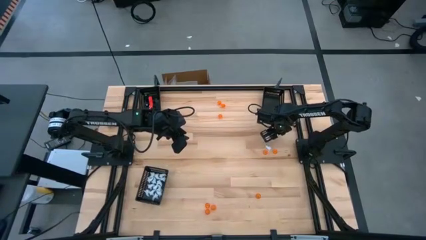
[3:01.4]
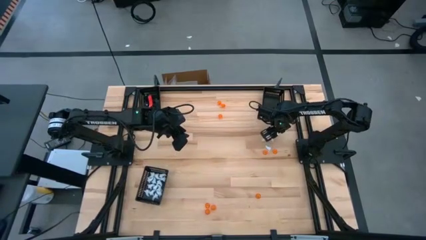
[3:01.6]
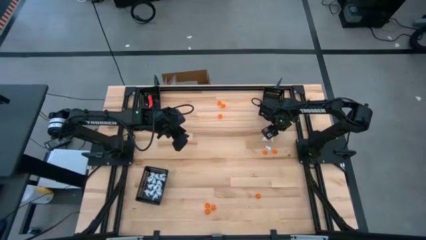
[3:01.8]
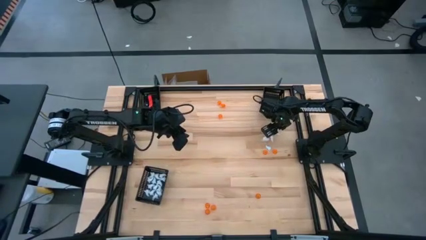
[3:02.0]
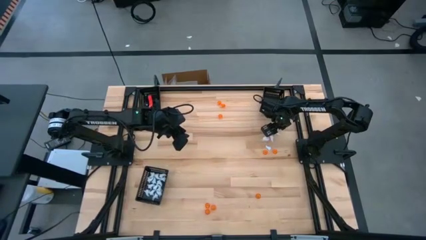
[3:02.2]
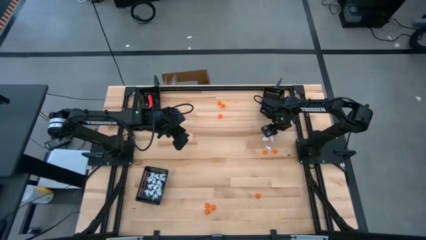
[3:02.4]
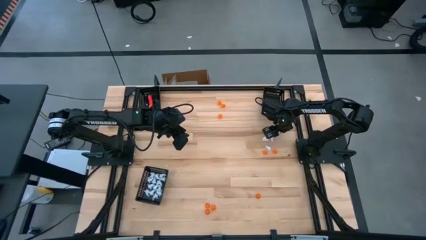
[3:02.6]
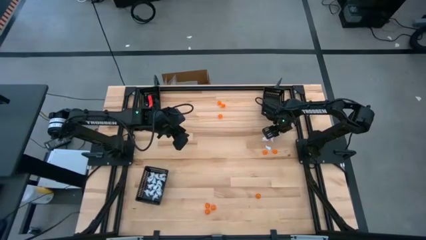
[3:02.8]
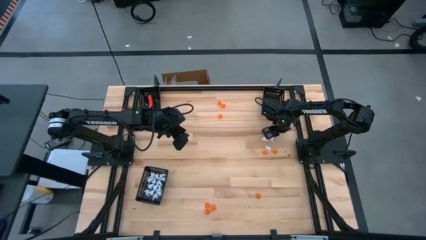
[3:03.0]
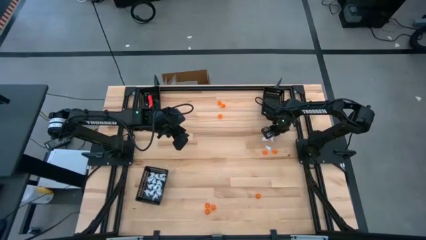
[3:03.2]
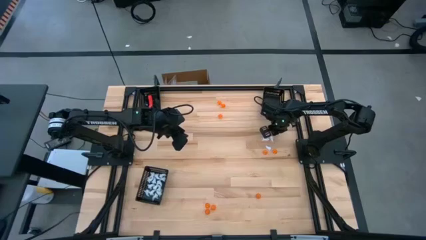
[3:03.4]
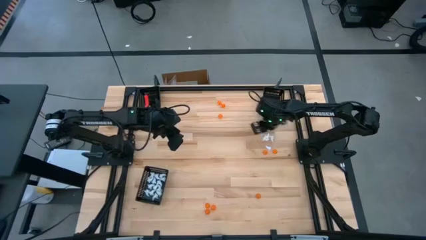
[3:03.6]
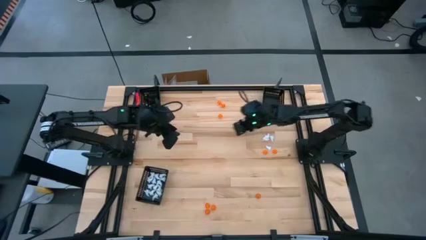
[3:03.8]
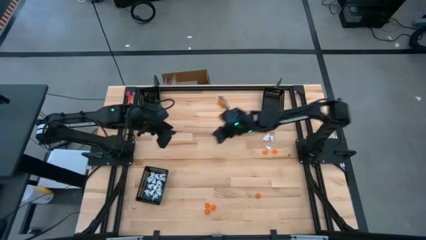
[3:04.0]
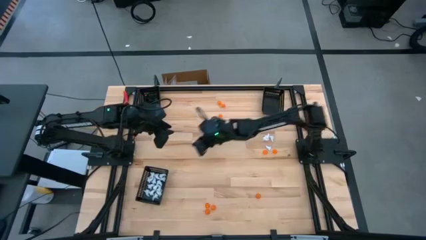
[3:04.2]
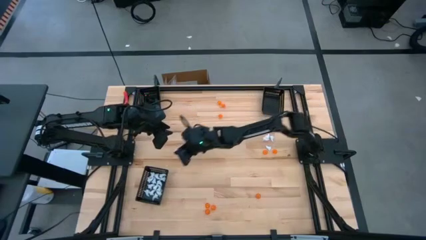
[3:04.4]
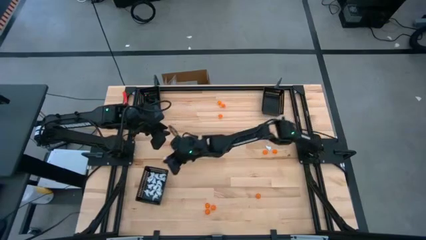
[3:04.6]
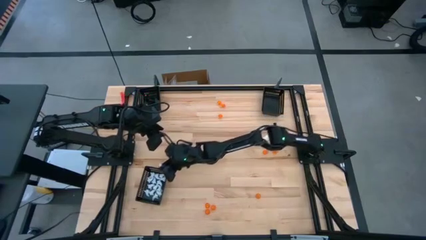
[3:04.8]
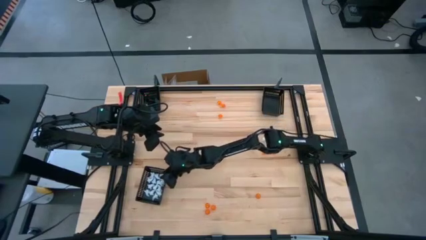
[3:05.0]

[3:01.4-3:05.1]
Task: Sort Halloween decoration
Put the white ghost toy into the bottom black basket

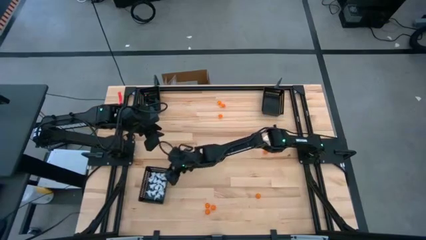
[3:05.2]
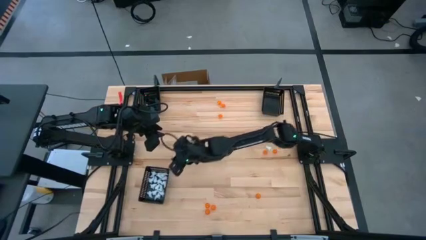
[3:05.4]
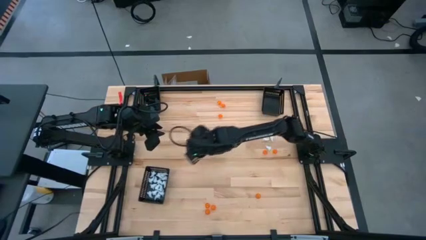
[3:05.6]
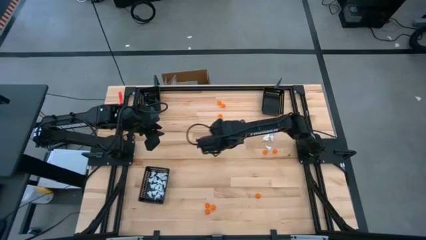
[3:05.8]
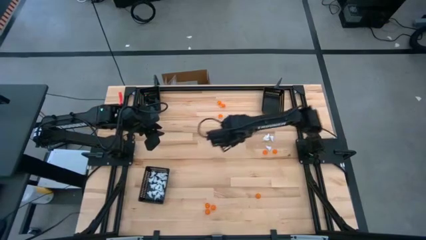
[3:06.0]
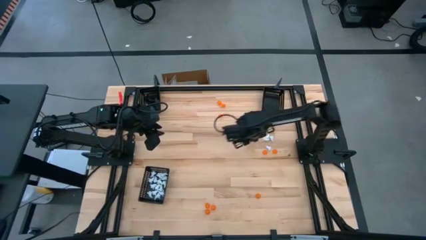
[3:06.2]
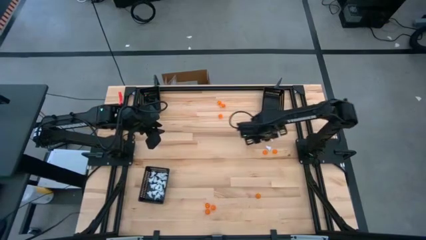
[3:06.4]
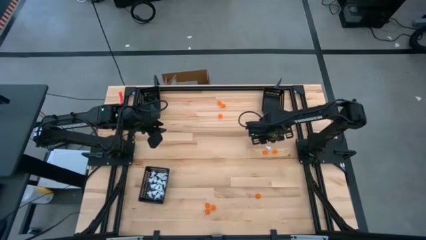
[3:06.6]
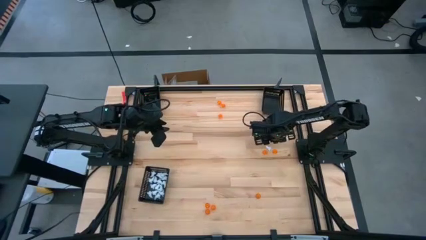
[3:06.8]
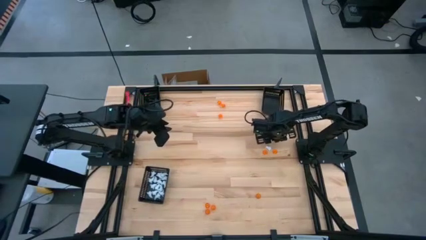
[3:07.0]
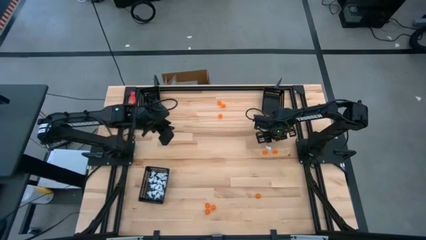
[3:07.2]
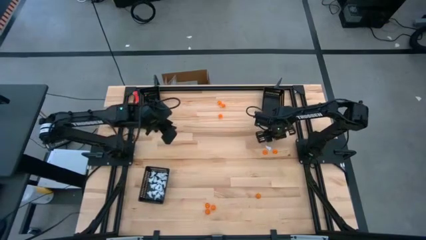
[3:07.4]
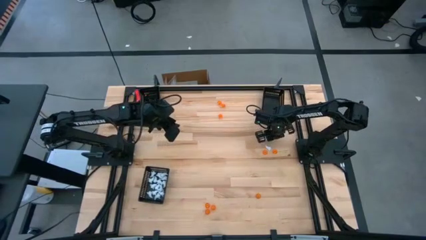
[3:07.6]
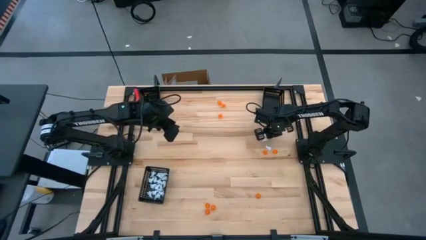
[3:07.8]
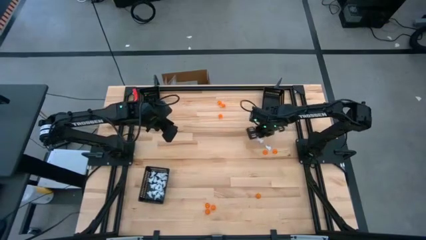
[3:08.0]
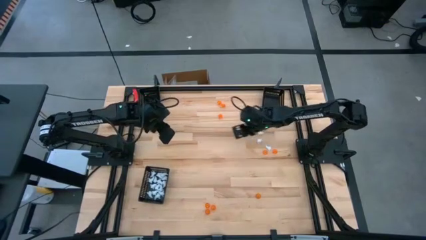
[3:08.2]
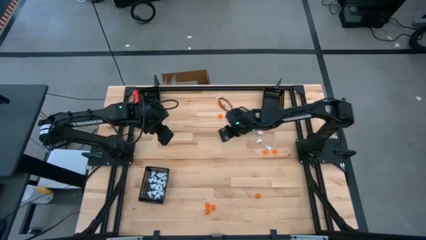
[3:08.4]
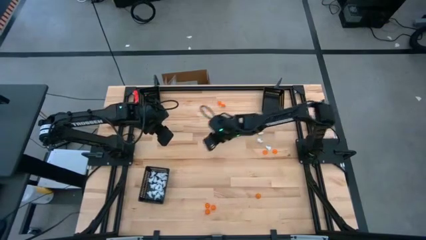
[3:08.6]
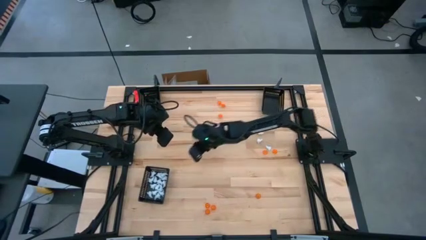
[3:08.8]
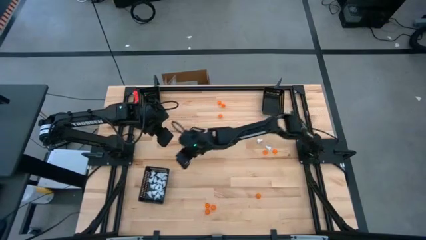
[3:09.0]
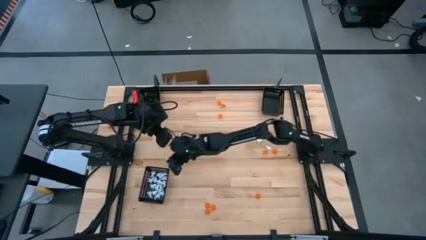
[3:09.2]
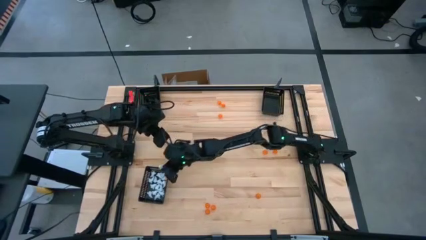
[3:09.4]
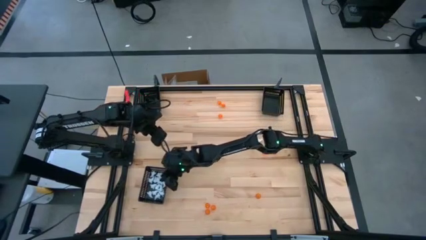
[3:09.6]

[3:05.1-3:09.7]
Put the white ghost toy into the bottom black basket

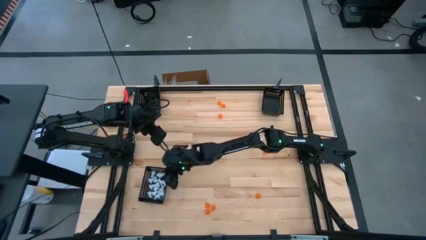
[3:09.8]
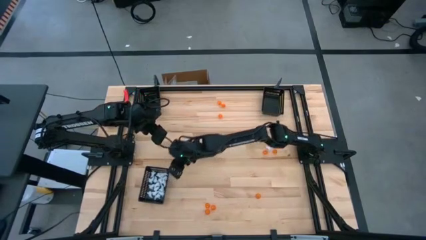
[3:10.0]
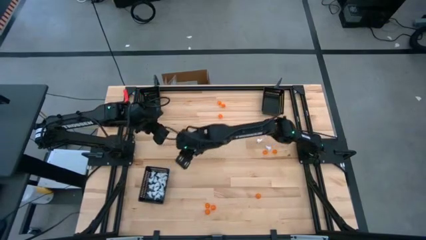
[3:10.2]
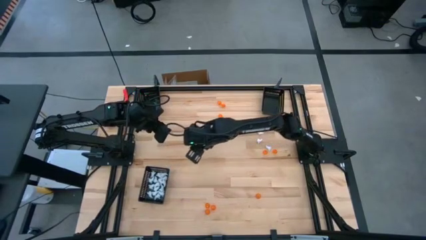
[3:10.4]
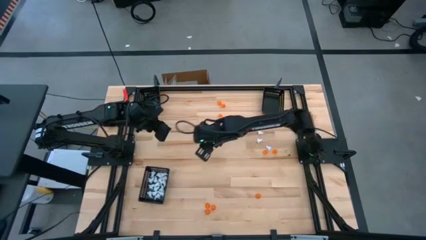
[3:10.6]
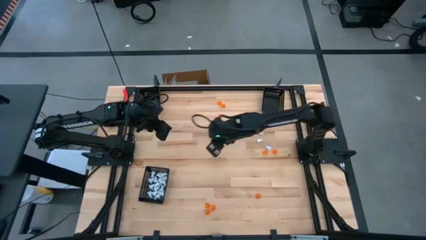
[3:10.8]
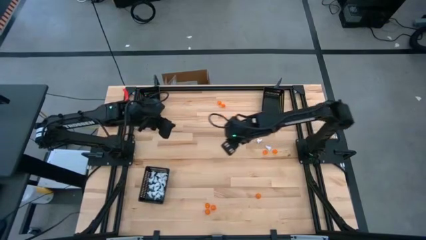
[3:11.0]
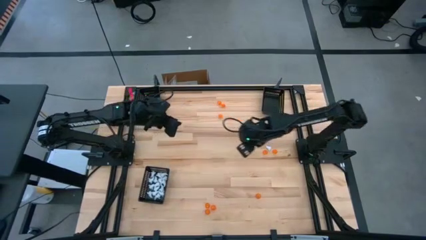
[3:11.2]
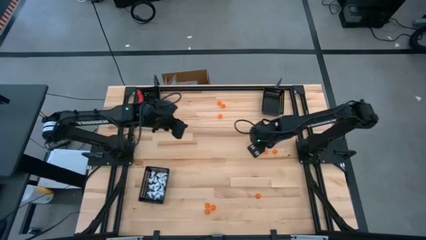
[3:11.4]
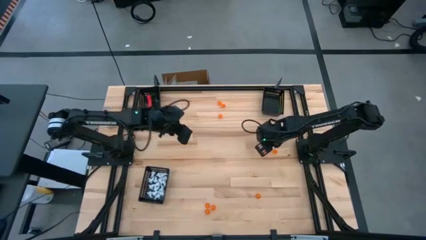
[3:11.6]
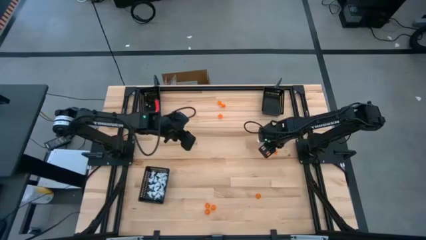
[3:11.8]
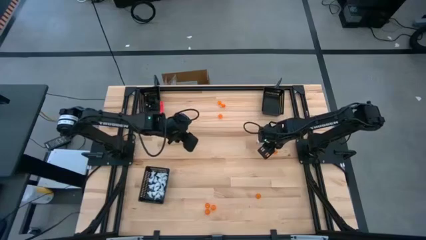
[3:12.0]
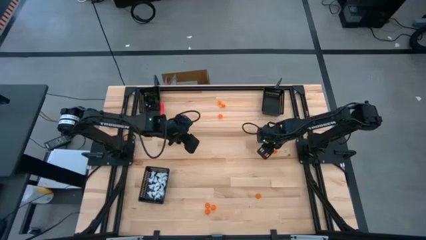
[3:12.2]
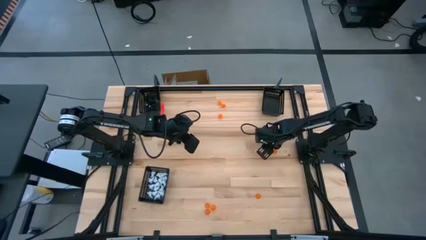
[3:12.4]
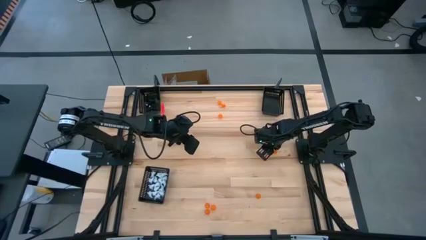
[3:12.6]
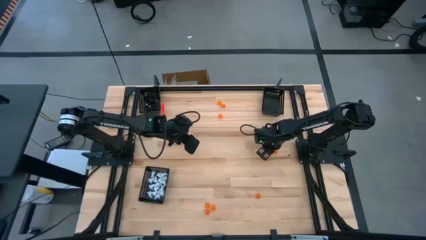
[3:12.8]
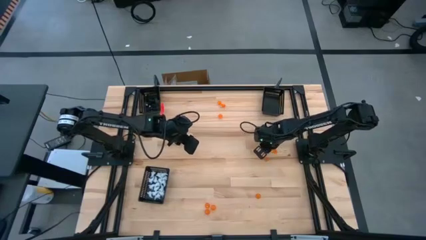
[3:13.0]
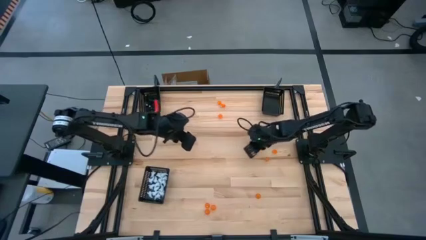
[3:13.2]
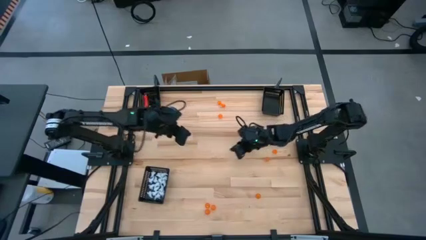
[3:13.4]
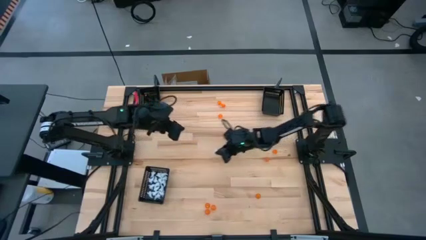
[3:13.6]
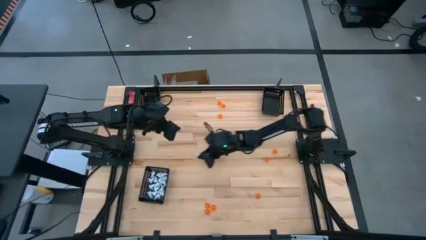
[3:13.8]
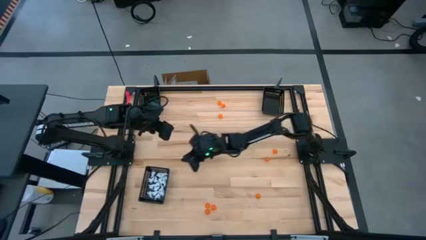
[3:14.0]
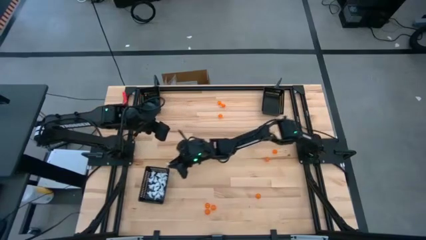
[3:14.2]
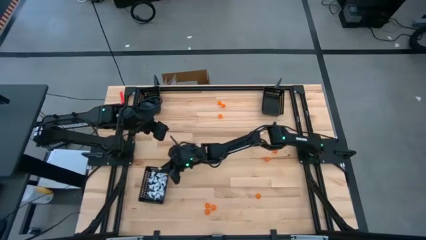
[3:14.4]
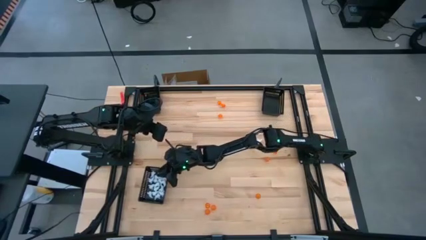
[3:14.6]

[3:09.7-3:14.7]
Put the white ghost toy into the bottom black basket

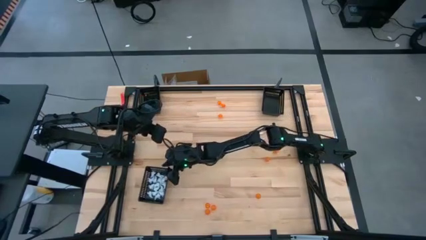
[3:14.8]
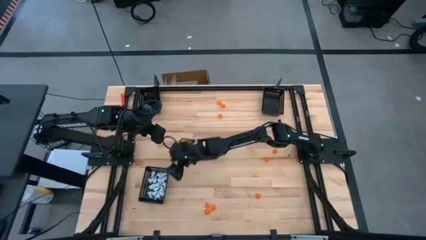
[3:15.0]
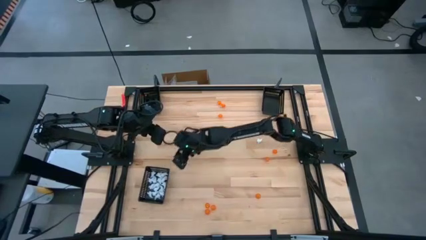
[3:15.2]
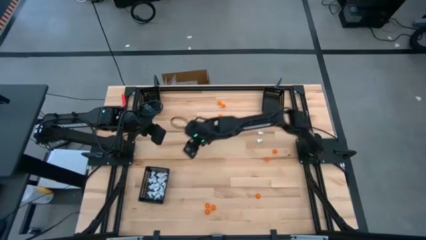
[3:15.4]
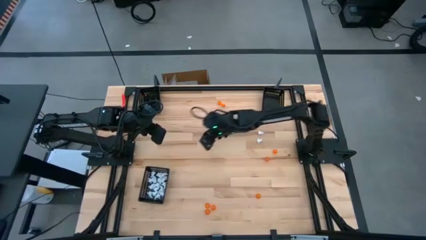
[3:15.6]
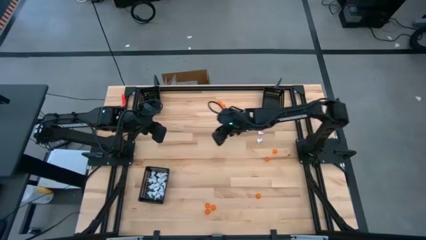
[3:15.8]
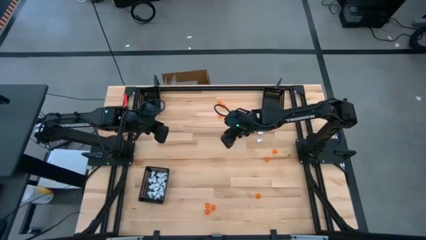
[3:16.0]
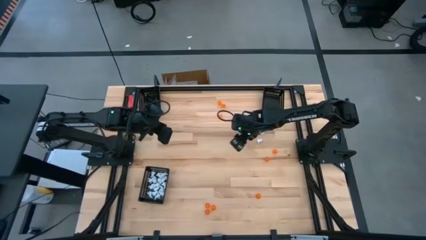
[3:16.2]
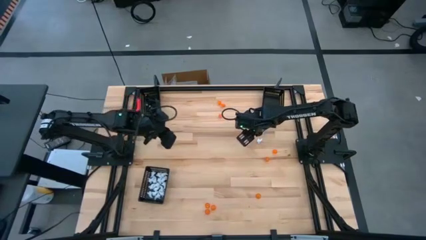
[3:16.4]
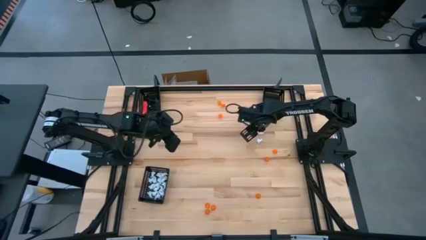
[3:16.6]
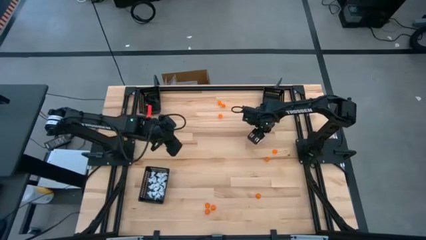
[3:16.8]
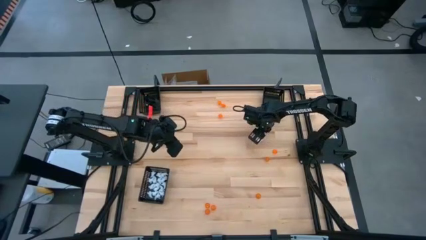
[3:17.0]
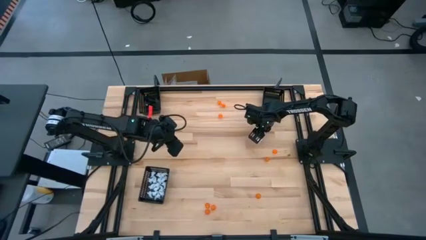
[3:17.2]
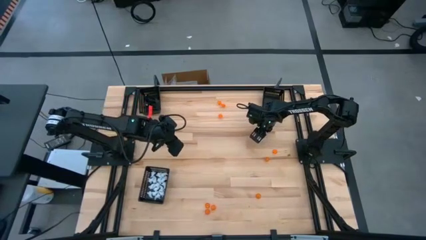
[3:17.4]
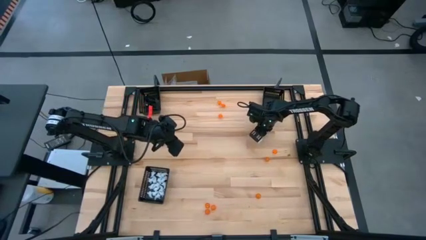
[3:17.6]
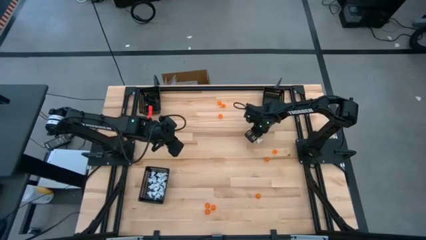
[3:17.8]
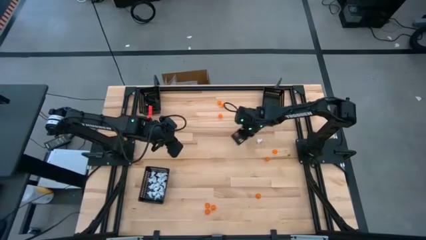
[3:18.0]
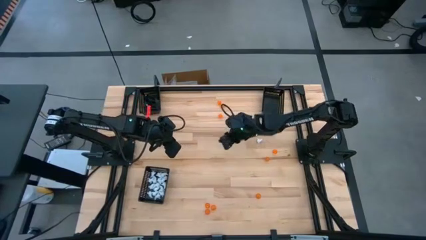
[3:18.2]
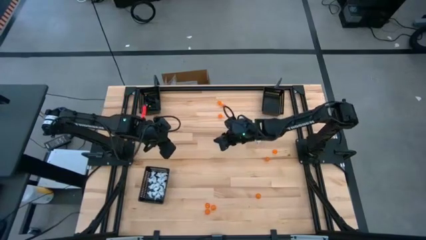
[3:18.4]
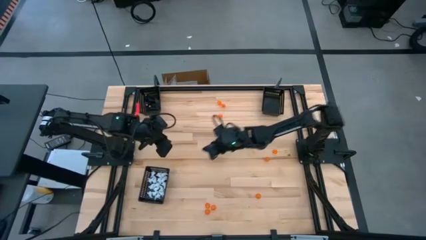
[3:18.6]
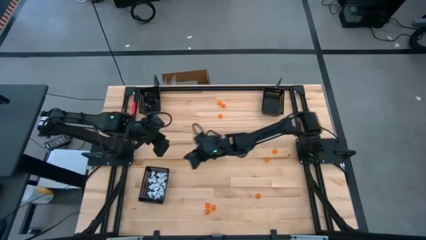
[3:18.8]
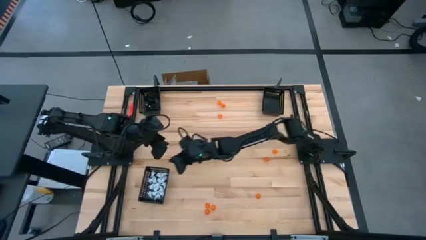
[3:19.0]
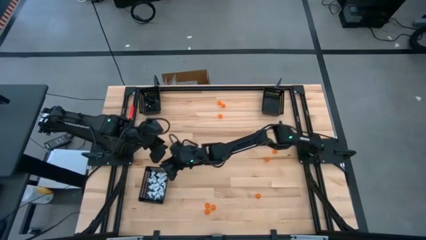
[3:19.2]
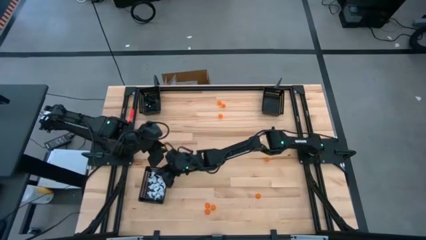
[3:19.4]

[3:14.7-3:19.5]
Put the white ghost toy into the bottom black basket
